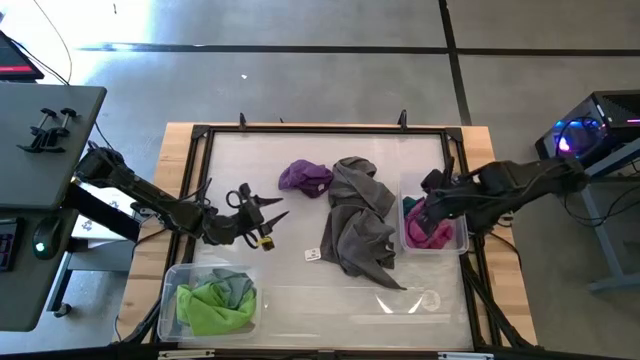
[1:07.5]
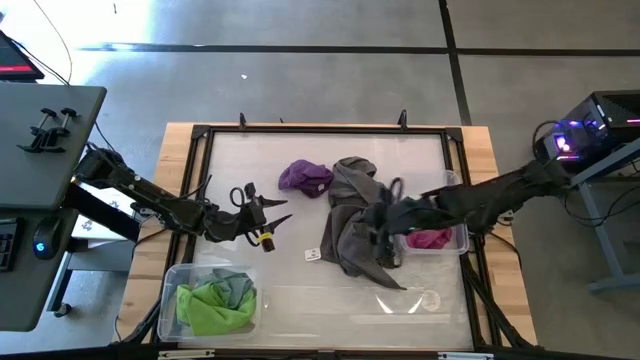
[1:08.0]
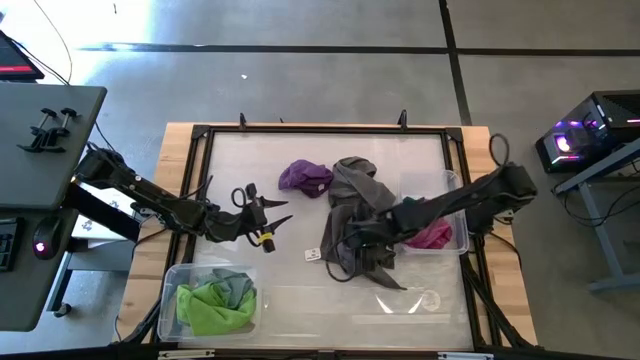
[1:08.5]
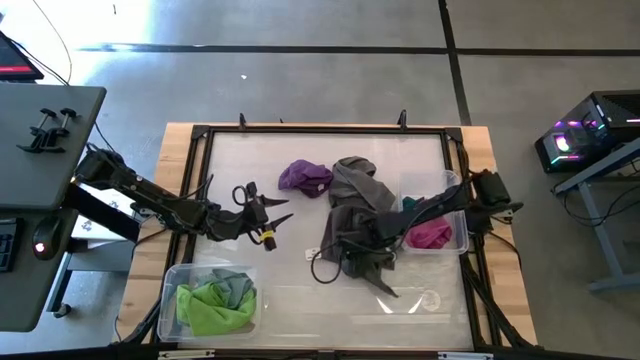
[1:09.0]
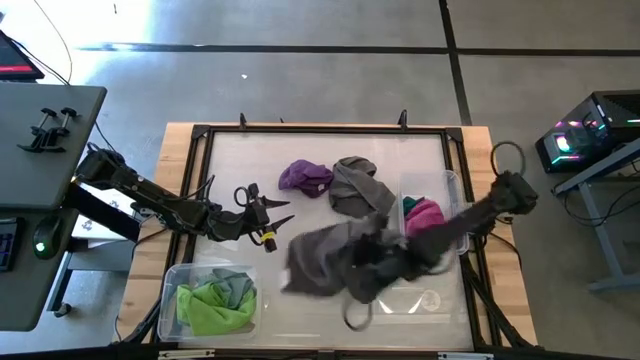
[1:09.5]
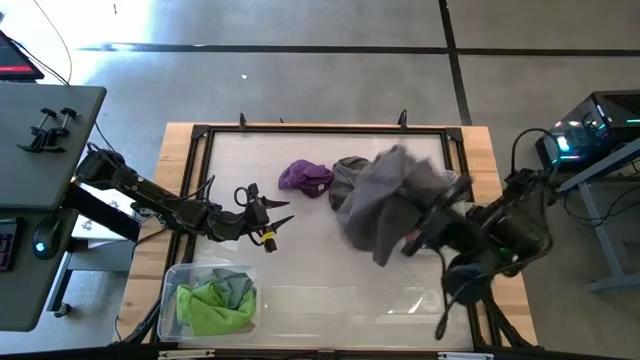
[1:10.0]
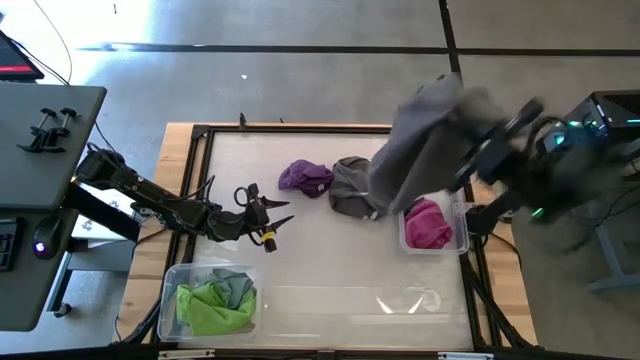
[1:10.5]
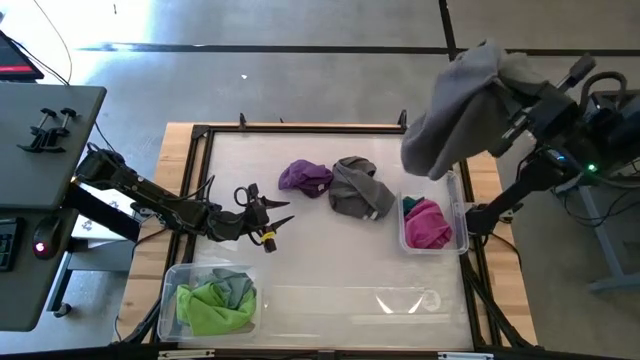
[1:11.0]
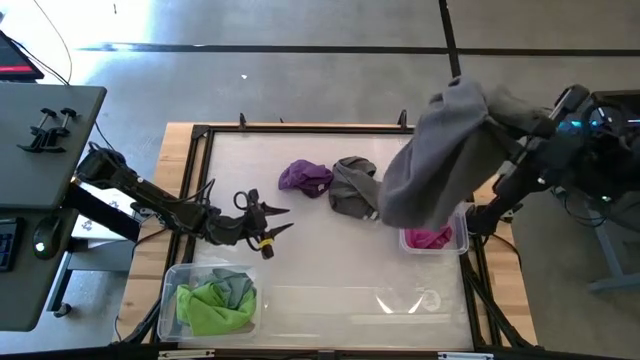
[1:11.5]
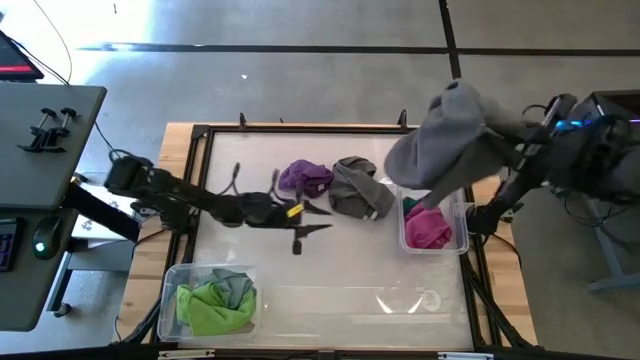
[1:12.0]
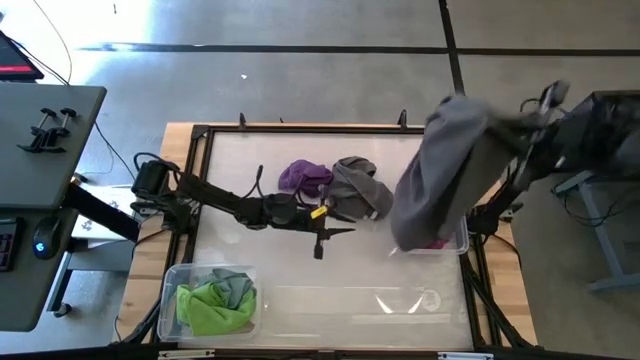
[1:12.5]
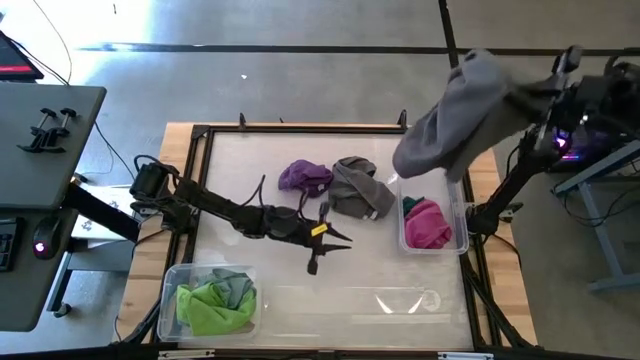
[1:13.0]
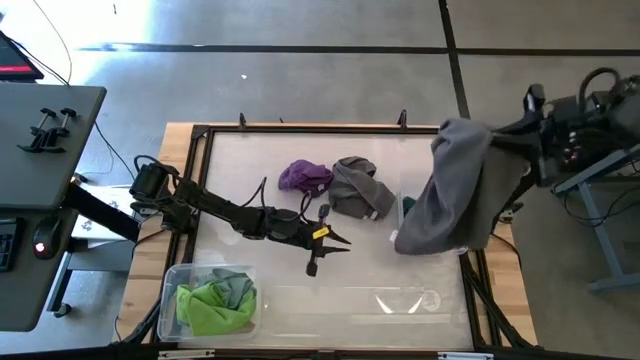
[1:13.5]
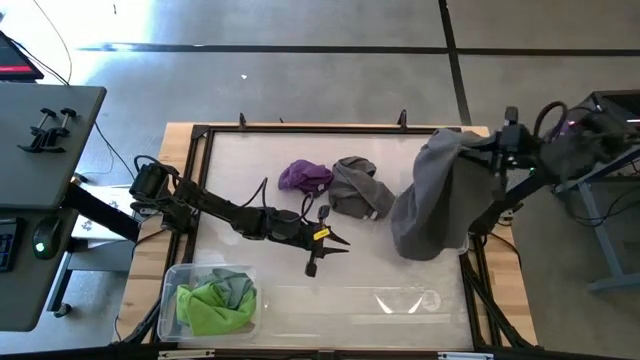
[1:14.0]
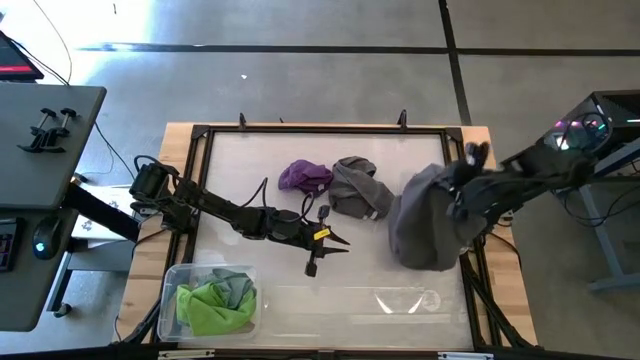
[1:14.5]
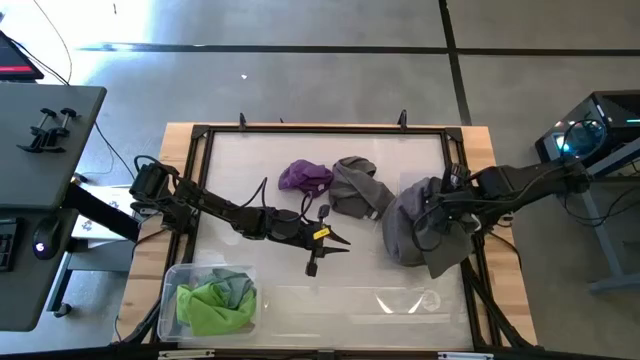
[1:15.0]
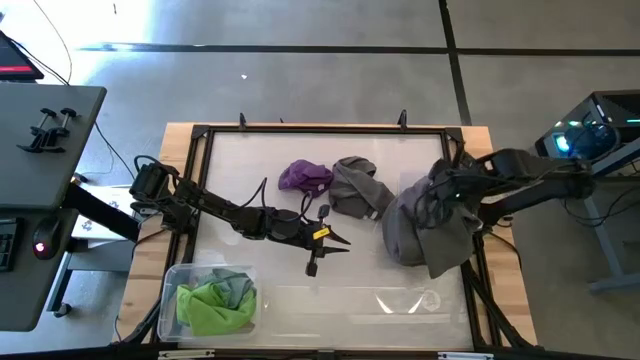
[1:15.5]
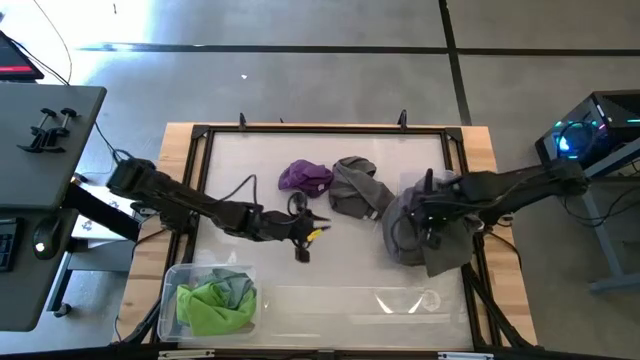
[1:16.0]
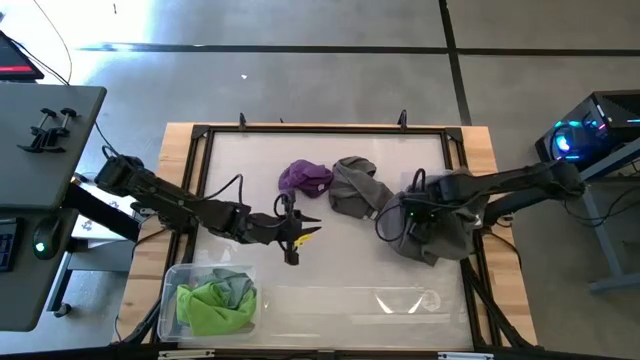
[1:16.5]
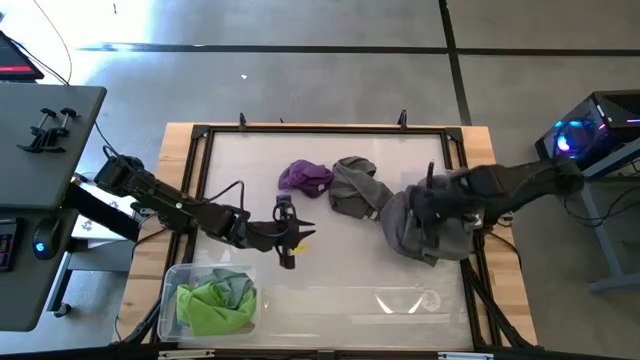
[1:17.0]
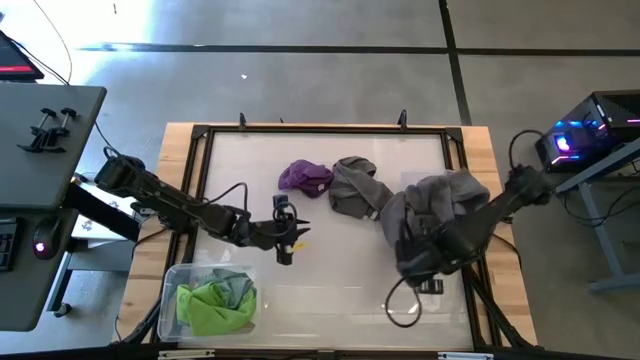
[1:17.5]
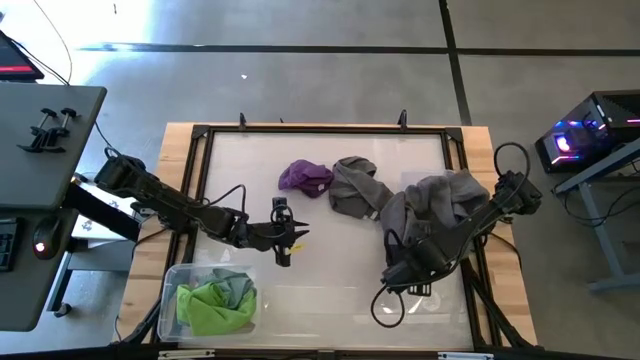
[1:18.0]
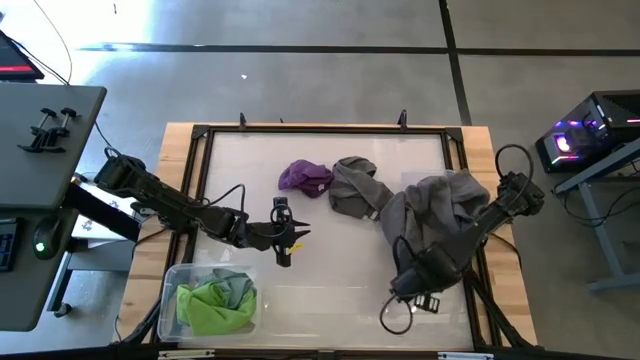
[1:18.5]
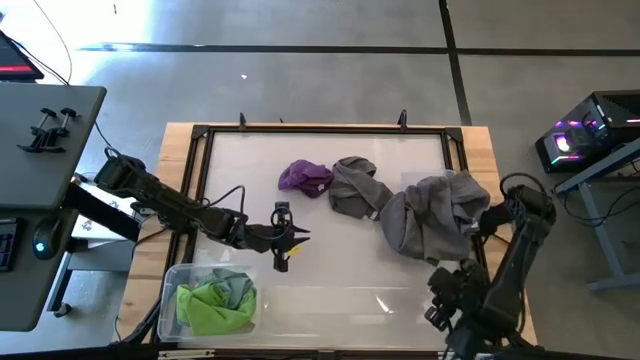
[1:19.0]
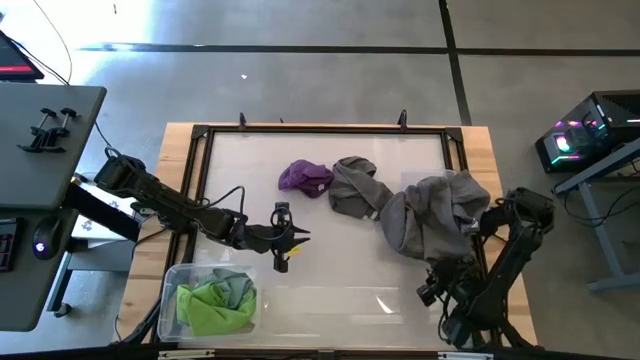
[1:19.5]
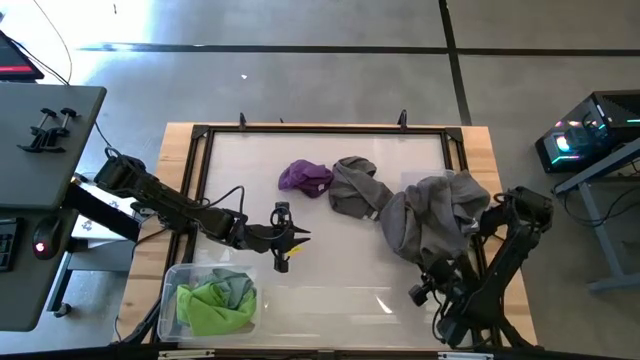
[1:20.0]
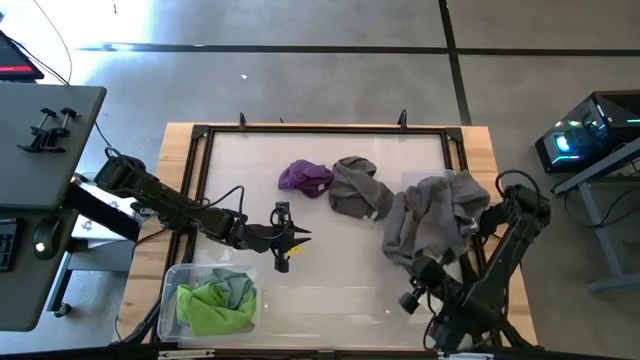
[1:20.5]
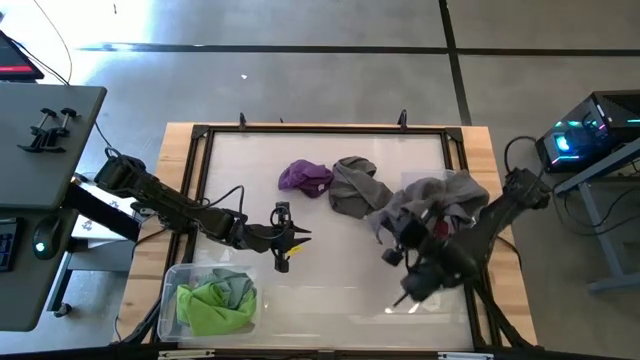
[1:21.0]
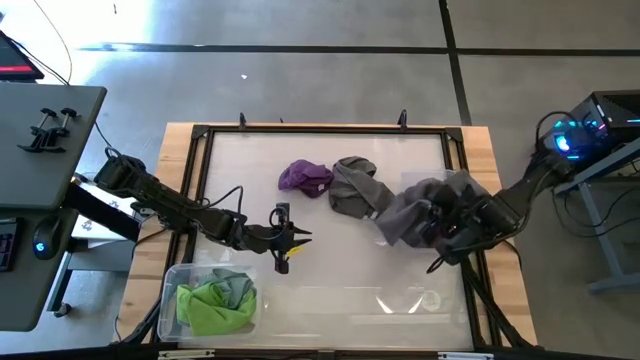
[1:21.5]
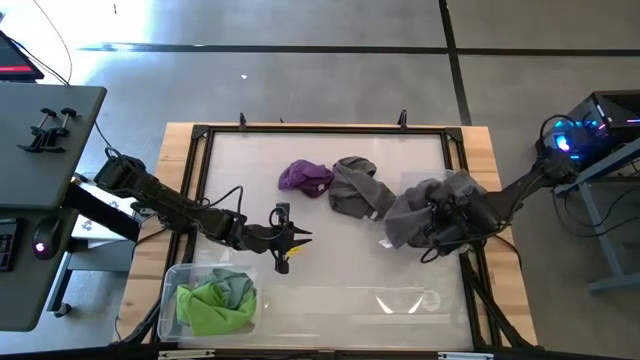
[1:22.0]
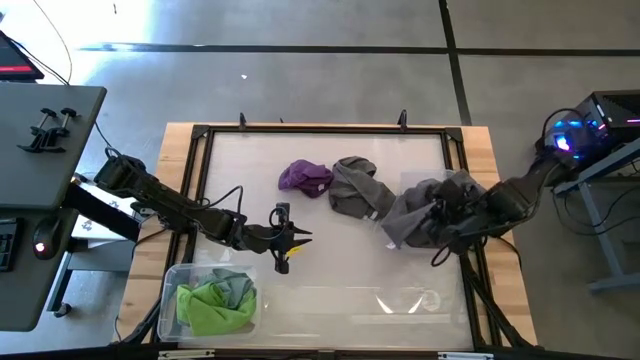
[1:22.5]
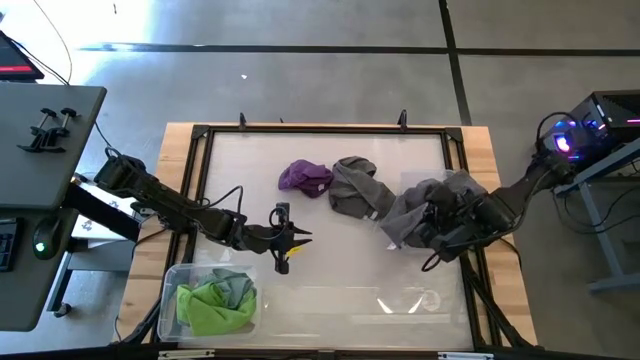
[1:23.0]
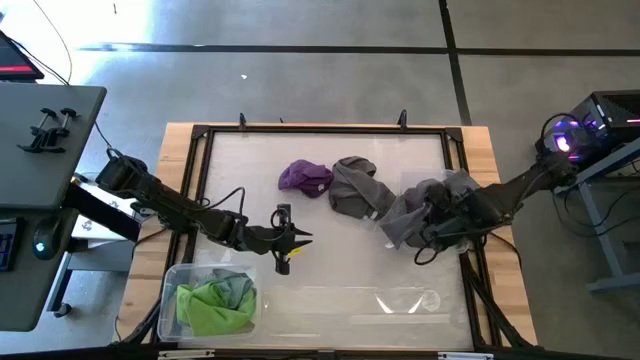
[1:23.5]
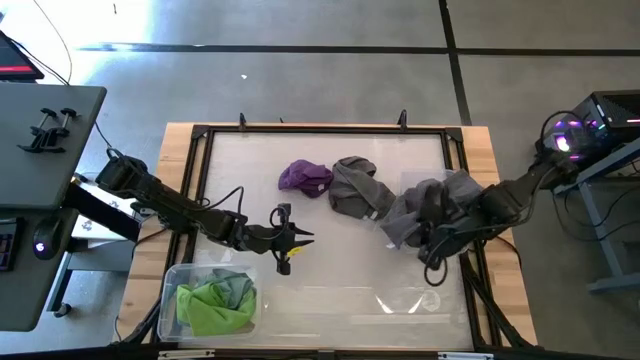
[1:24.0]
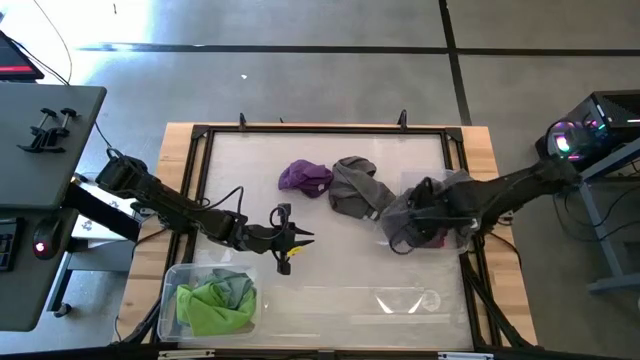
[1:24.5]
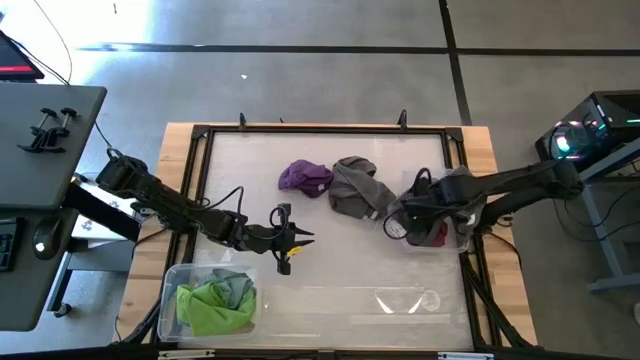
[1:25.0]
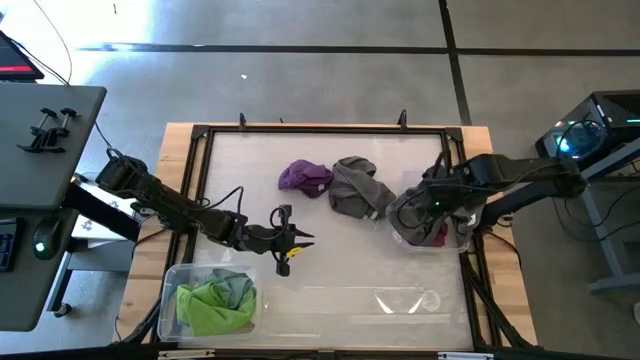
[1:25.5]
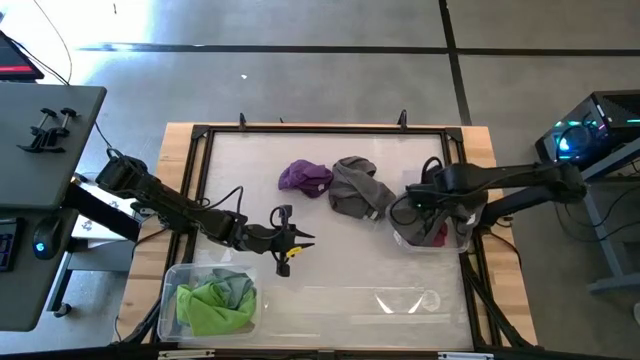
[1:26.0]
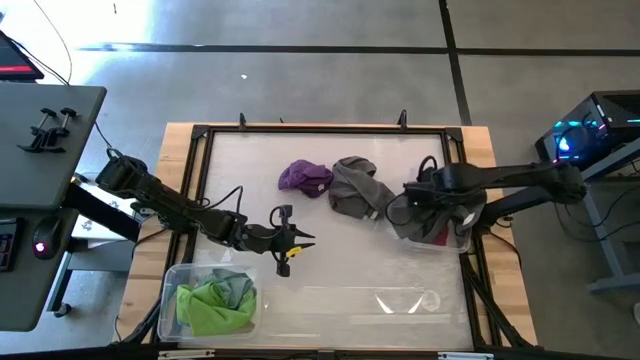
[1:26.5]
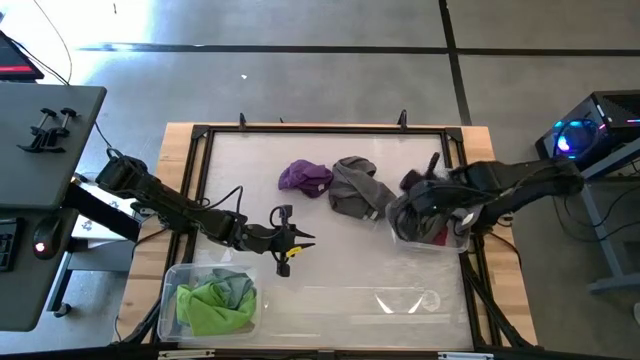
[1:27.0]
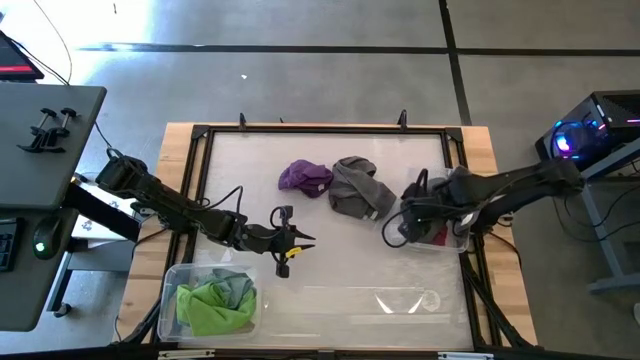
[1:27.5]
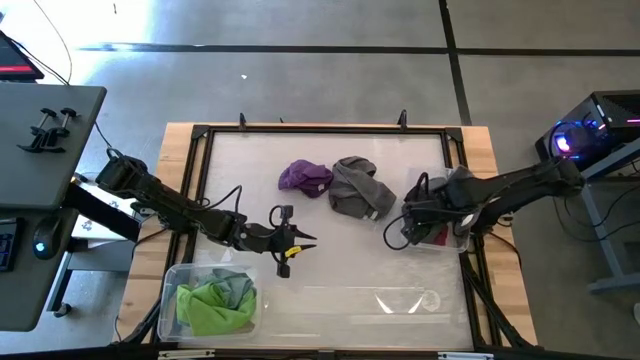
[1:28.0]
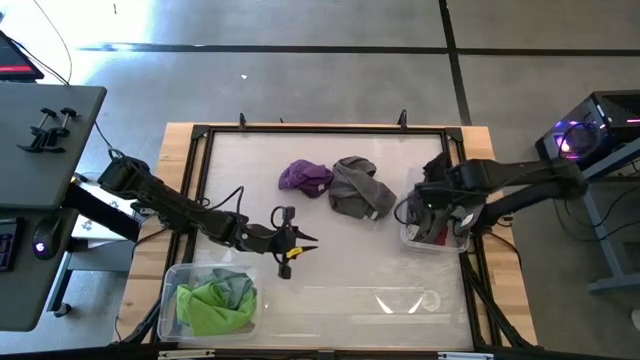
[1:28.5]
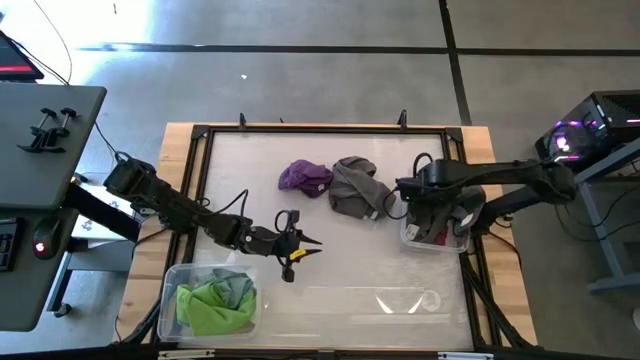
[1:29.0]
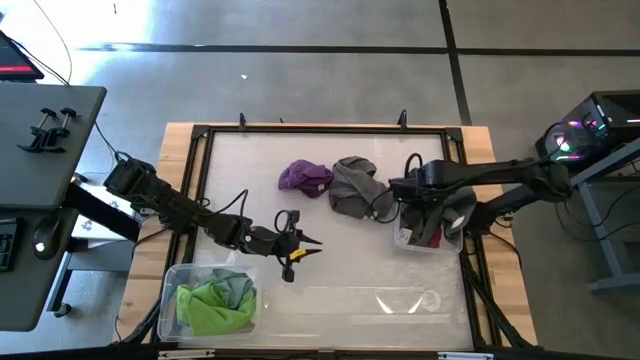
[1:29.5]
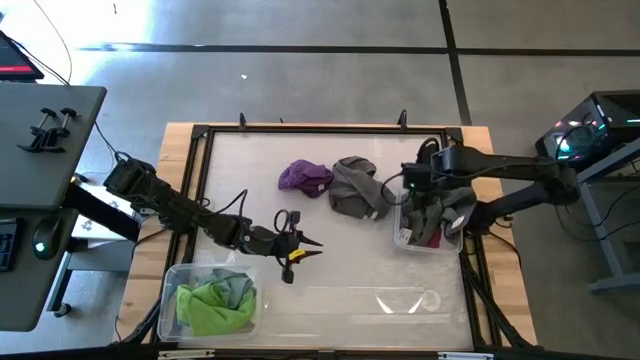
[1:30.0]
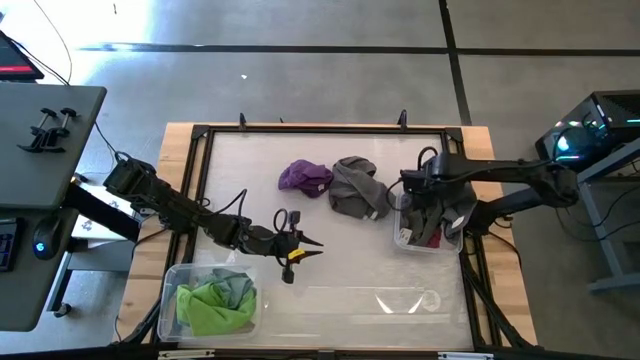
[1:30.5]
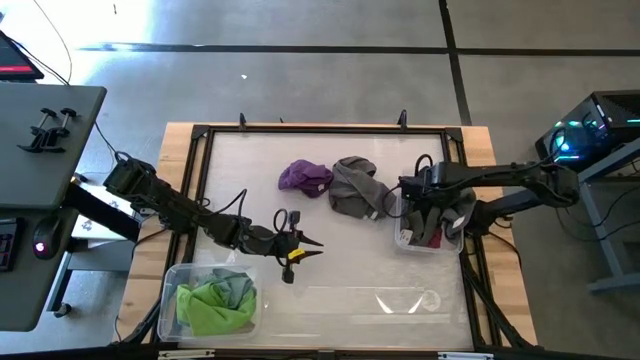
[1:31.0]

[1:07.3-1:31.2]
Task: Sort microfiber towel by color & place in baskets
Put the bottom gray microfiber towel into the top transparent bin
